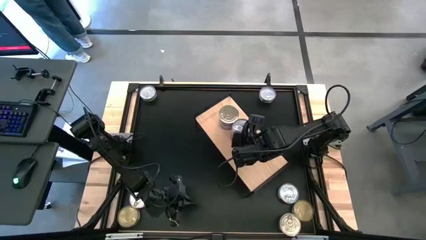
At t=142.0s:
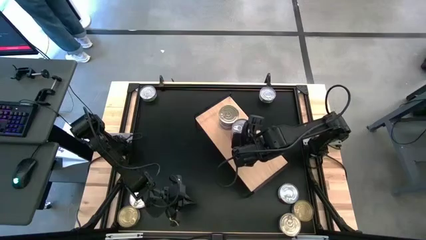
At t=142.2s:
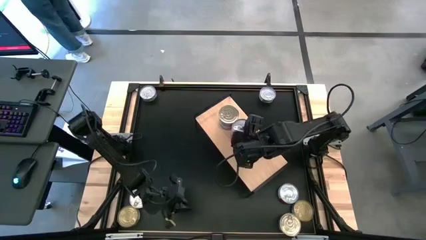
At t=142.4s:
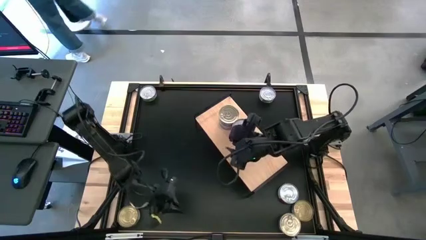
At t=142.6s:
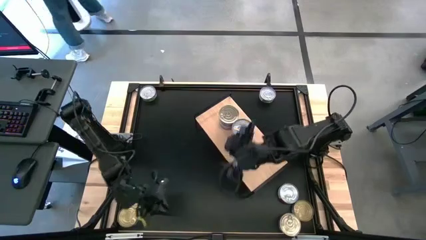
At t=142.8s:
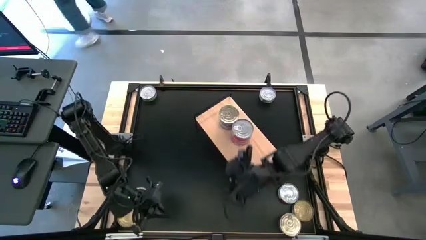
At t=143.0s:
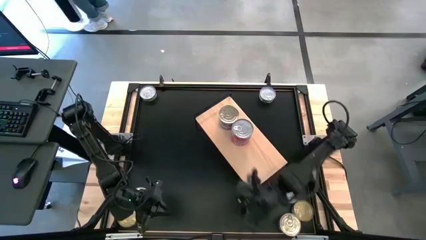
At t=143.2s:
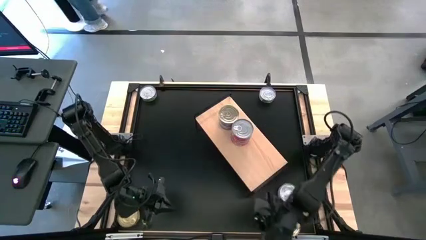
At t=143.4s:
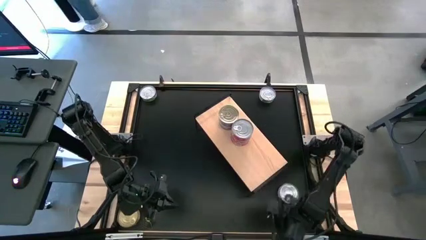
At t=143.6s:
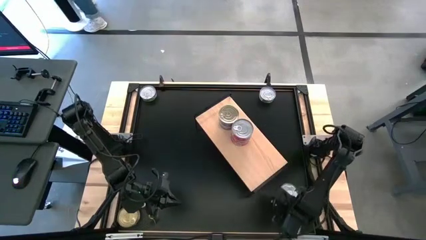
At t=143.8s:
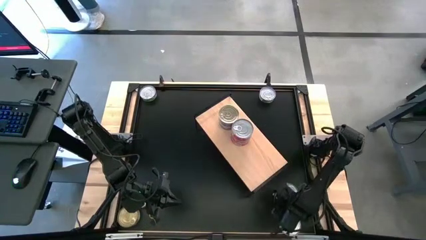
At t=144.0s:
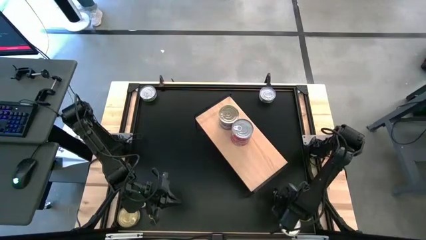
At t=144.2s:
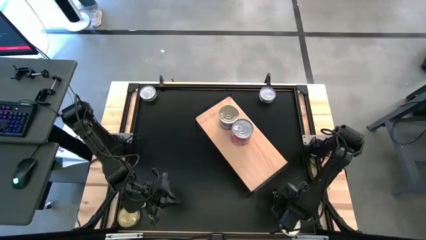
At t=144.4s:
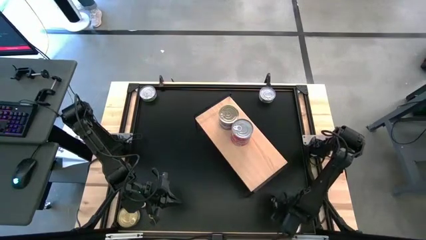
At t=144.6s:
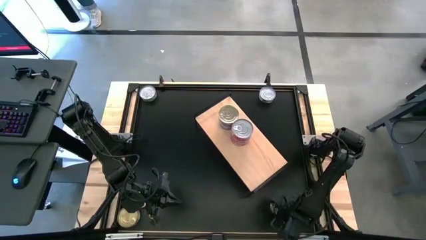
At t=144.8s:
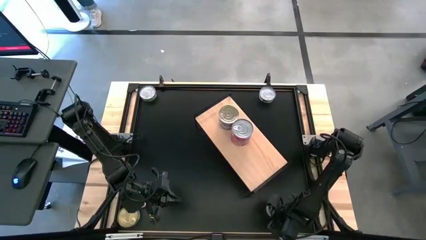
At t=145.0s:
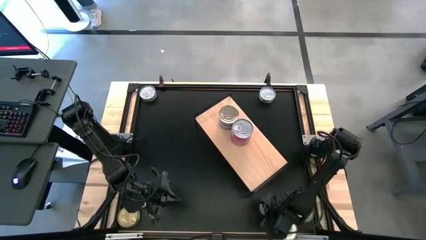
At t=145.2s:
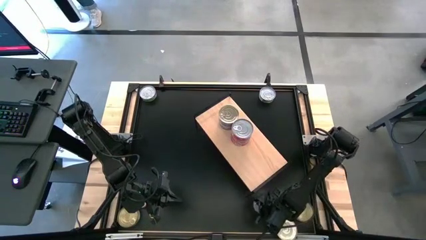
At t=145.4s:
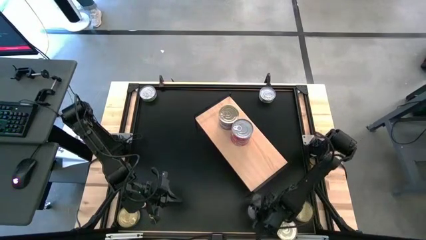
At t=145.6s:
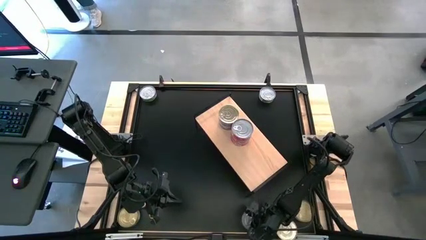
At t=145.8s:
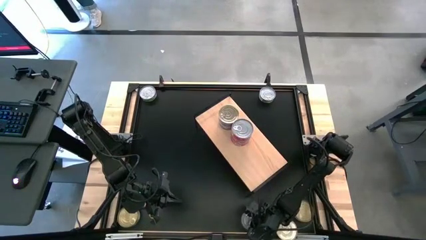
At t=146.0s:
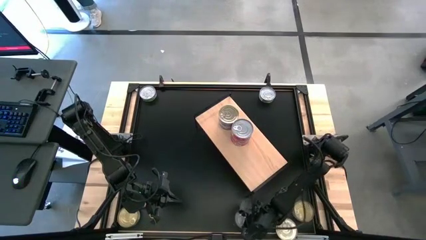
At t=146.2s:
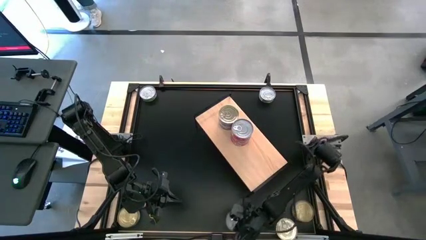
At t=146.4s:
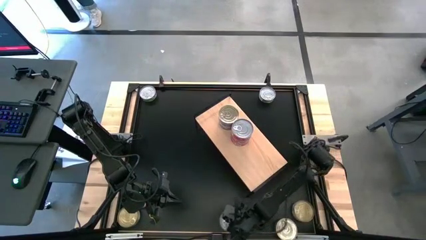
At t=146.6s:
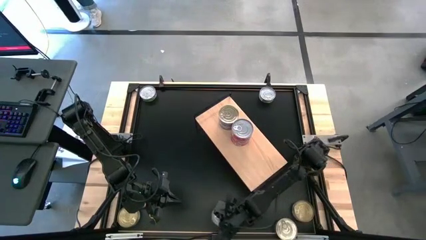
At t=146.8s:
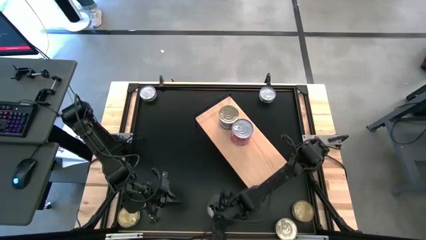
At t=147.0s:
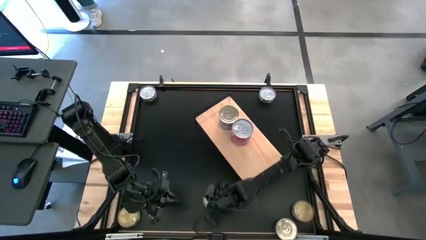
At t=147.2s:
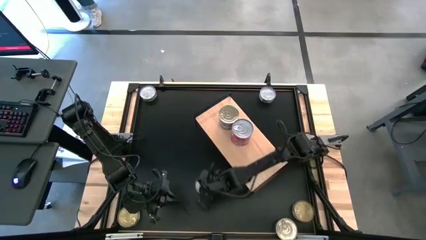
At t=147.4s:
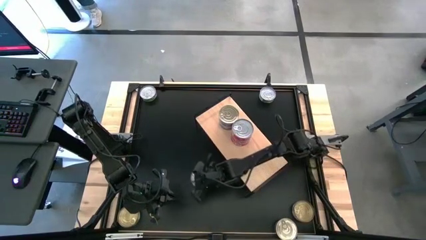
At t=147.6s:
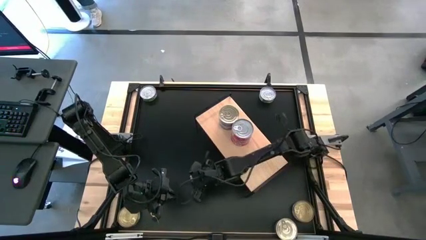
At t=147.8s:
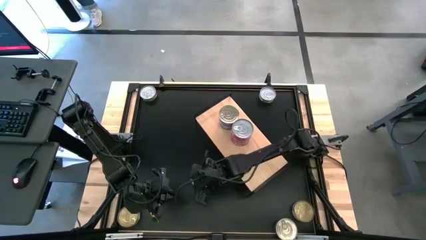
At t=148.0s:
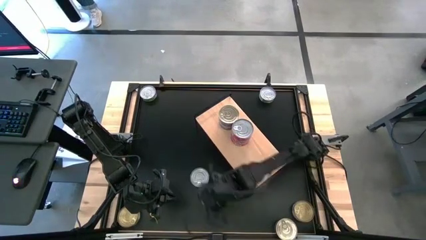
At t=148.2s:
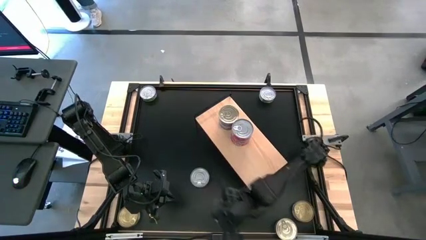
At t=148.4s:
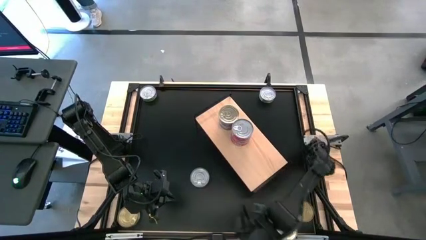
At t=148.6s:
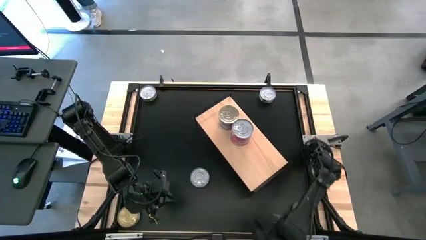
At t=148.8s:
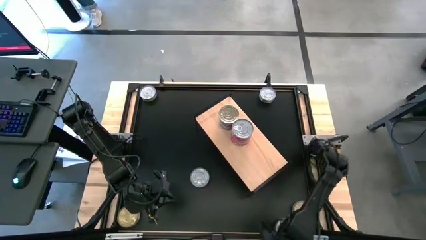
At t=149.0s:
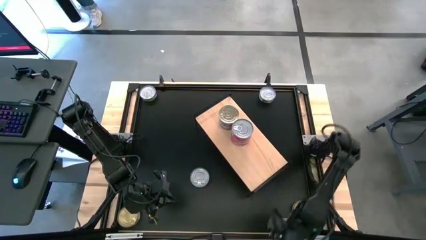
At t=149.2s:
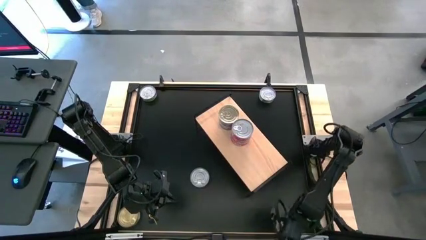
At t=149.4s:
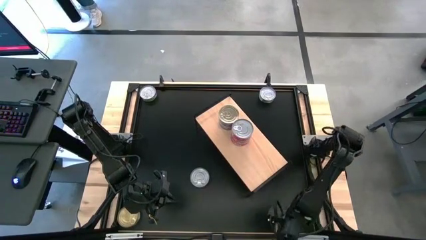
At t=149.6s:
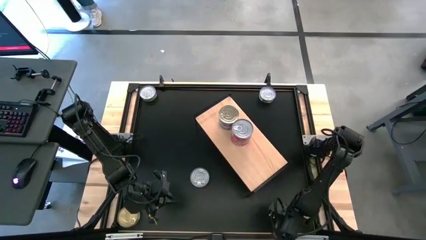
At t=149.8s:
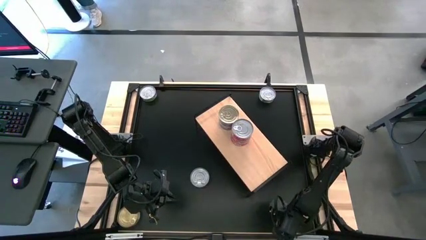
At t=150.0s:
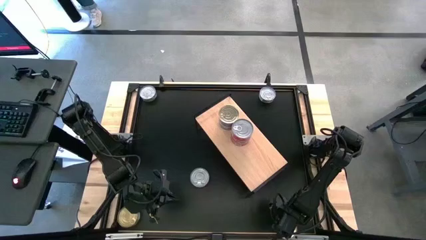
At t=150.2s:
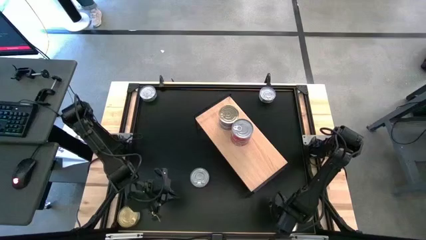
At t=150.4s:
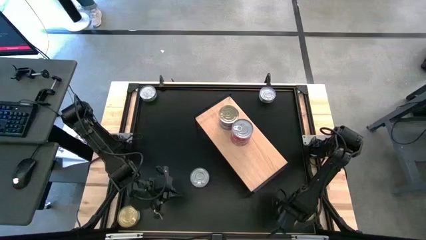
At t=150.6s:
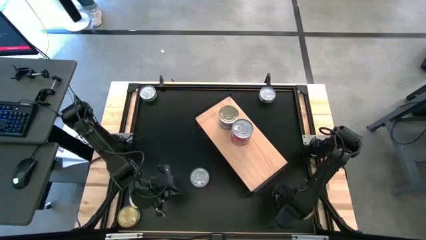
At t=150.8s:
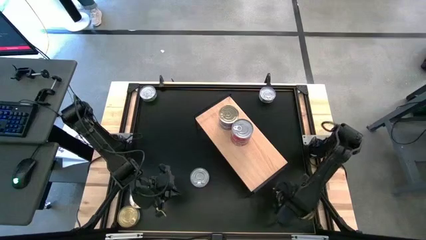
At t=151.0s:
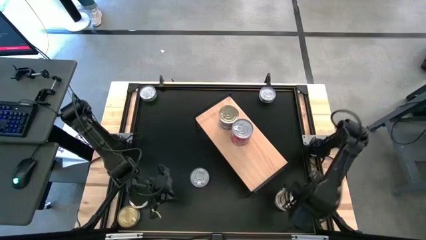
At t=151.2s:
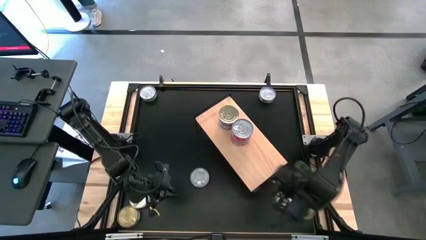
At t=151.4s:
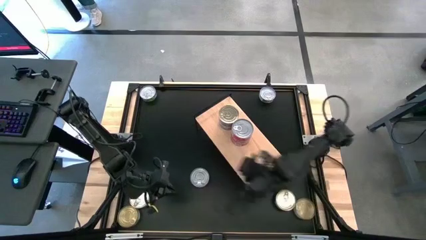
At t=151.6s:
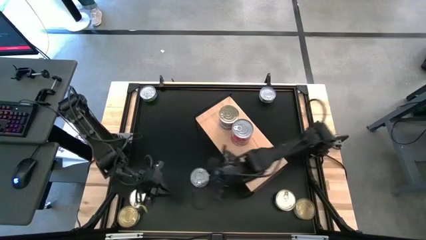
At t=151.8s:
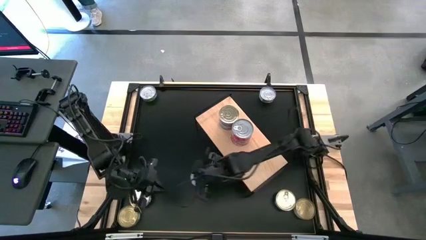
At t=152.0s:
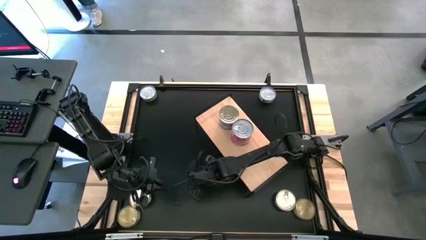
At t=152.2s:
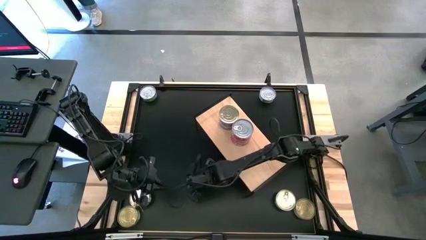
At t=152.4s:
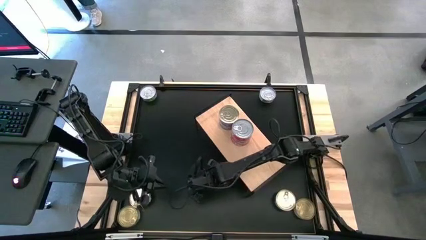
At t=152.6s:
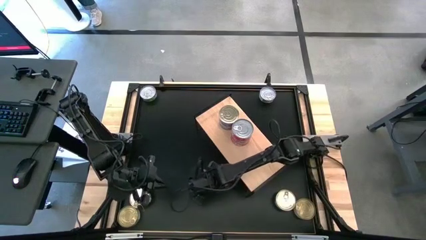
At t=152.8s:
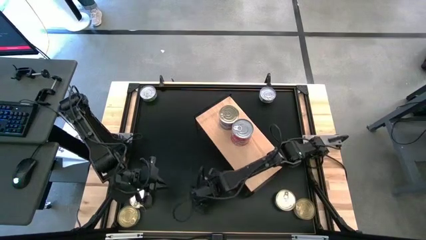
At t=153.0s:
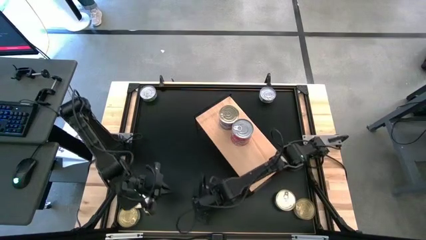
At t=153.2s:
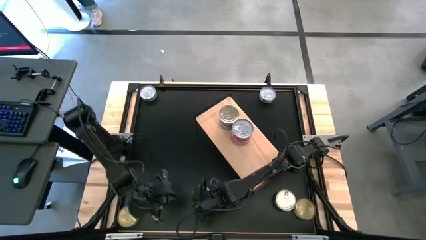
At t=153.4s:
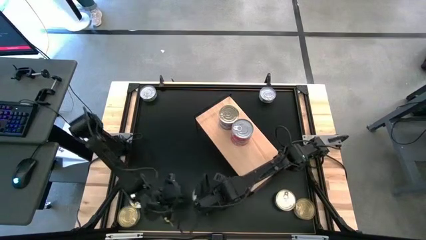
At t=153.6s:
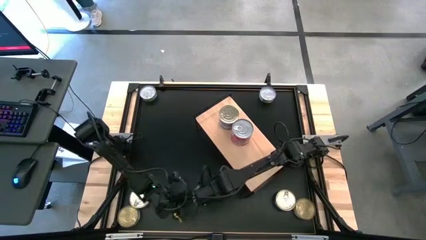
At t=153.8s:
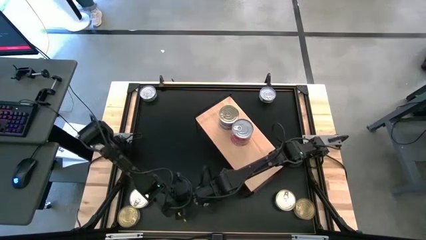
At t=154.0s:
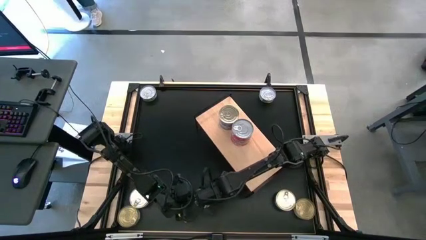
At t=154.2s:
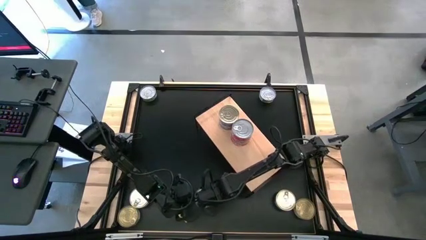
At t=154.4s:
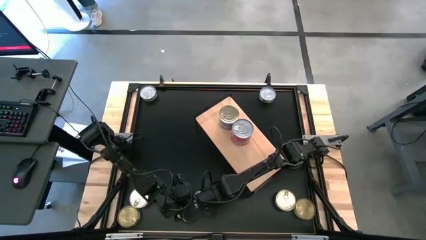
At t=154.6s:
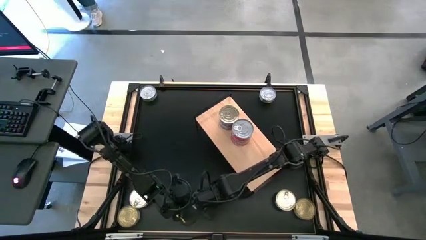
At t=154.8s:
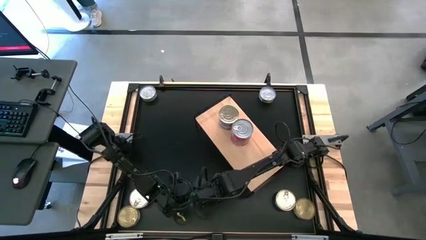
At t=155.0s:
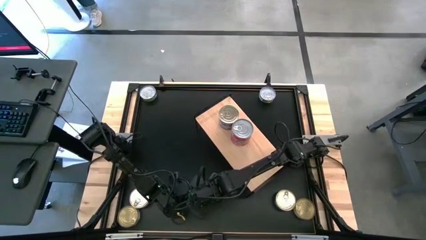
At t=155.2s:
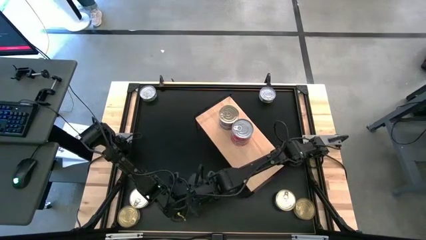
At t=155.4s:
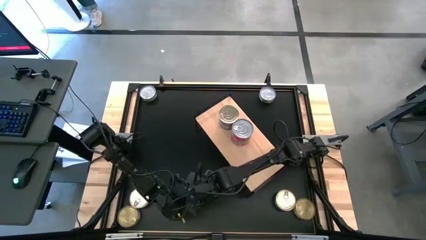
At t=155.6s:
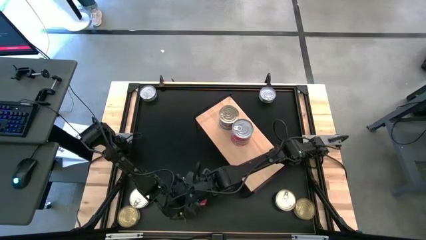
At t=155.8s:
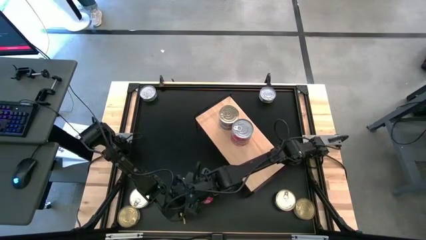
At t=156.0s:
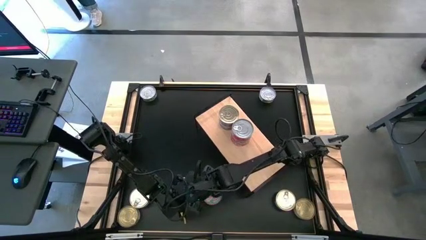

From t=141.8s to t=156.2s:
Task: Stack canned seafood by type on shelf
Stack the red tuna can on top of the red tuna can on the shelf
